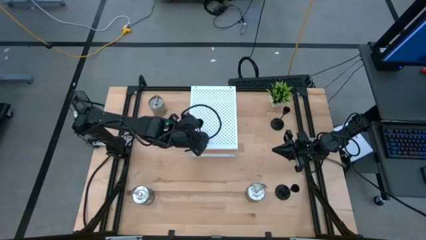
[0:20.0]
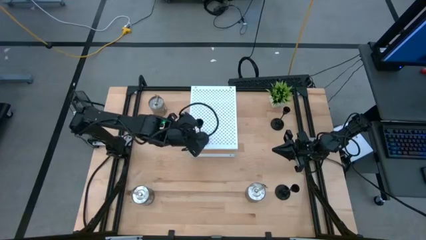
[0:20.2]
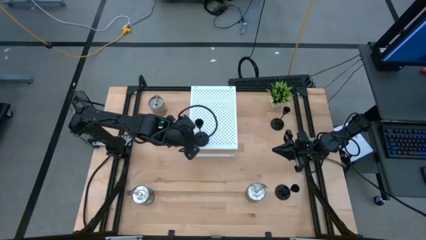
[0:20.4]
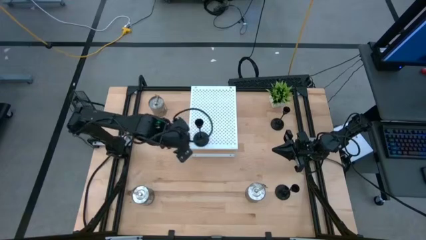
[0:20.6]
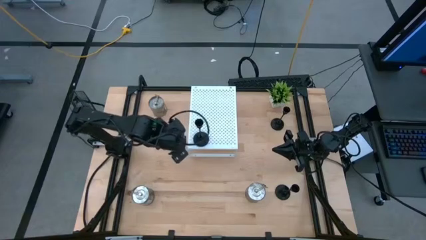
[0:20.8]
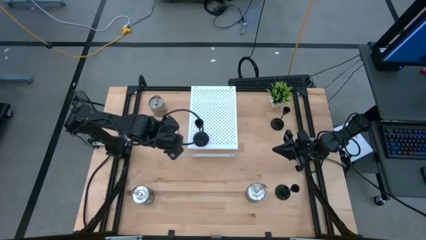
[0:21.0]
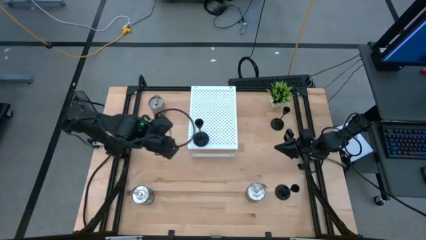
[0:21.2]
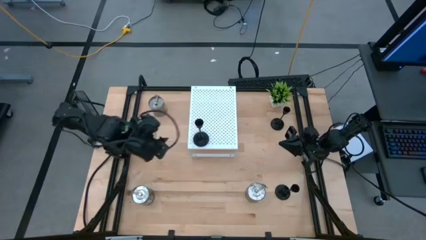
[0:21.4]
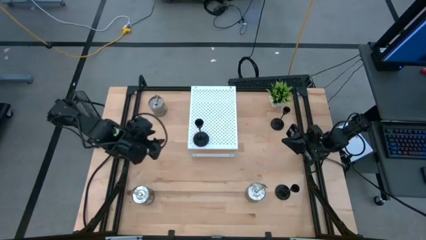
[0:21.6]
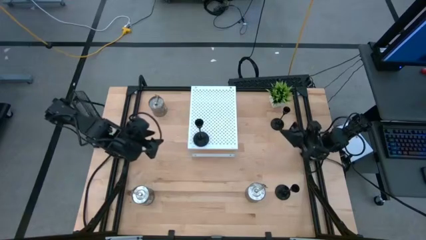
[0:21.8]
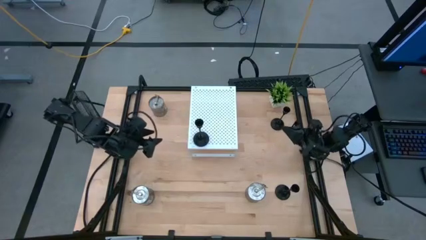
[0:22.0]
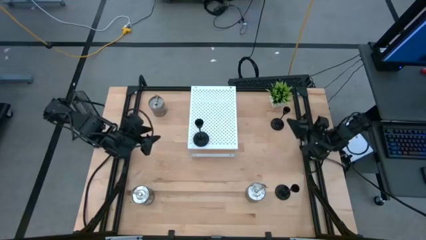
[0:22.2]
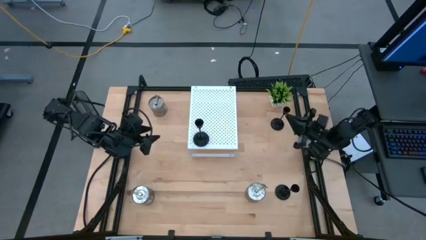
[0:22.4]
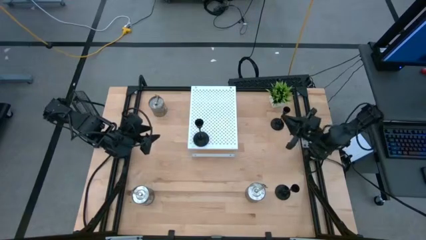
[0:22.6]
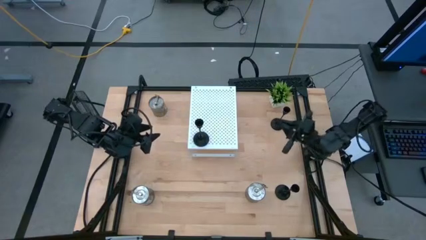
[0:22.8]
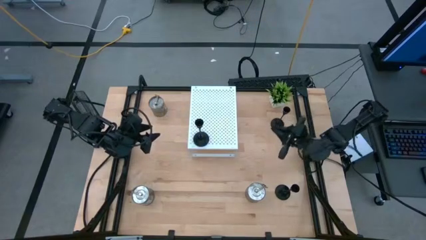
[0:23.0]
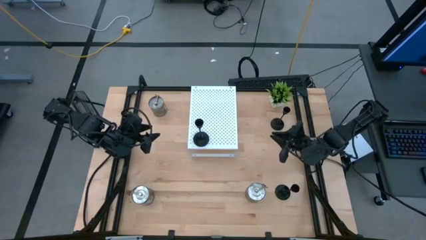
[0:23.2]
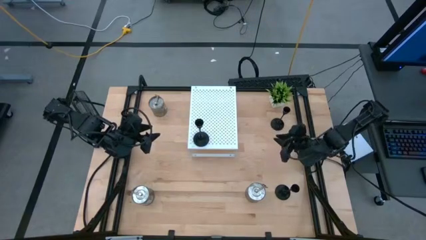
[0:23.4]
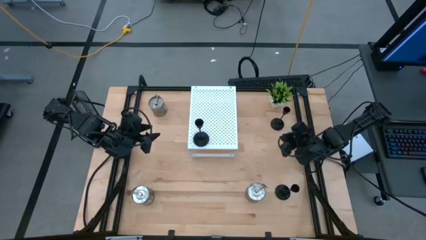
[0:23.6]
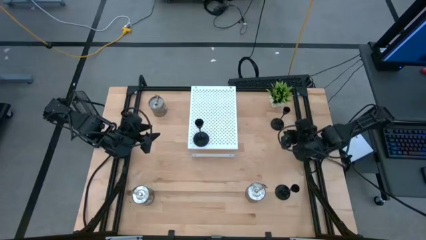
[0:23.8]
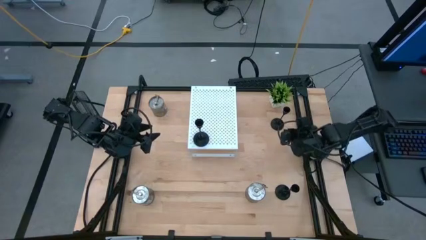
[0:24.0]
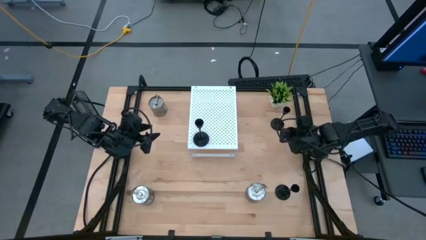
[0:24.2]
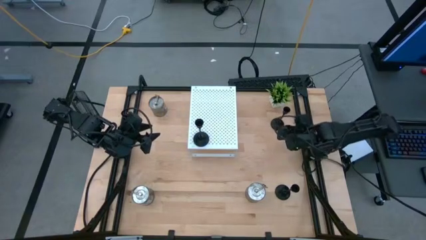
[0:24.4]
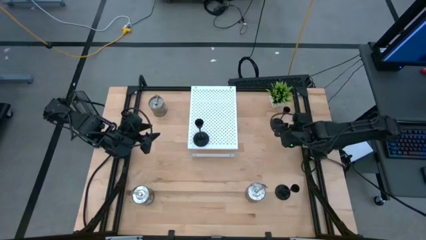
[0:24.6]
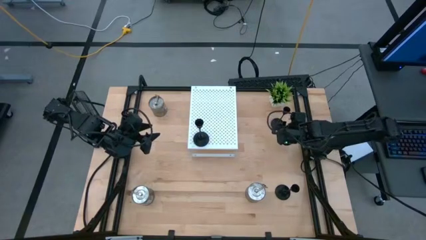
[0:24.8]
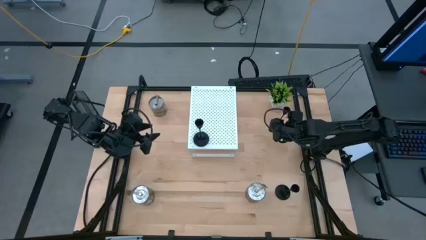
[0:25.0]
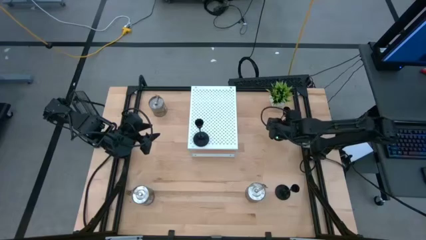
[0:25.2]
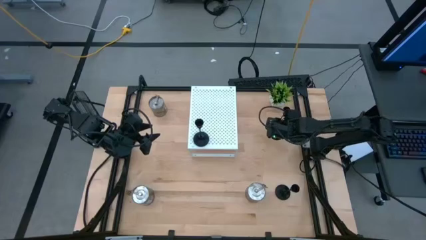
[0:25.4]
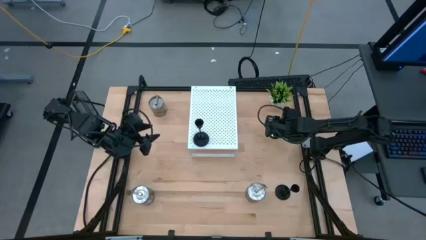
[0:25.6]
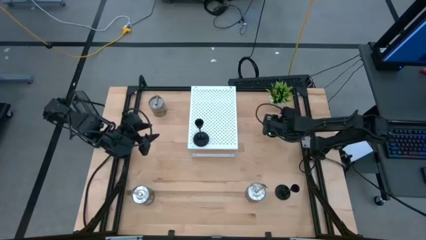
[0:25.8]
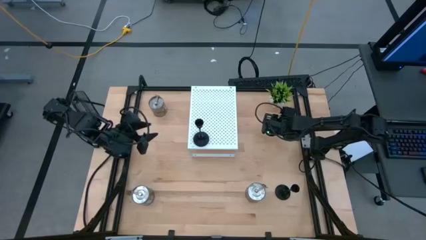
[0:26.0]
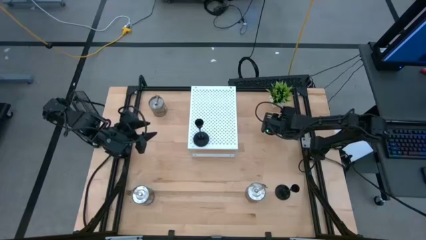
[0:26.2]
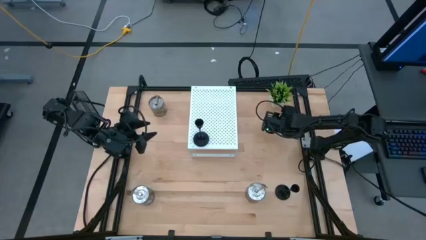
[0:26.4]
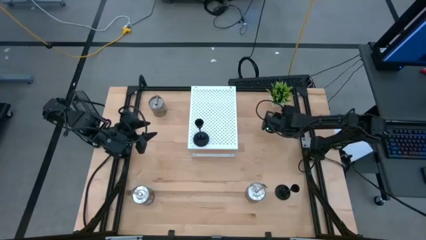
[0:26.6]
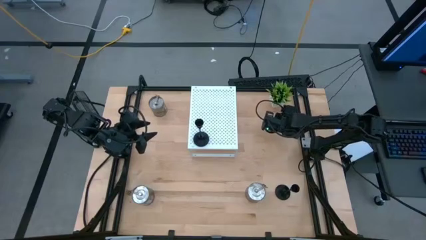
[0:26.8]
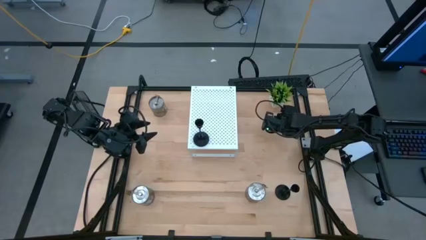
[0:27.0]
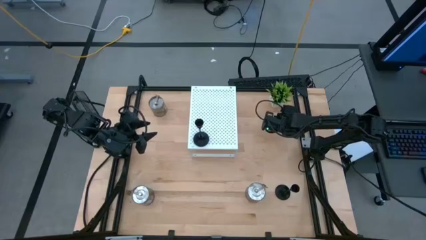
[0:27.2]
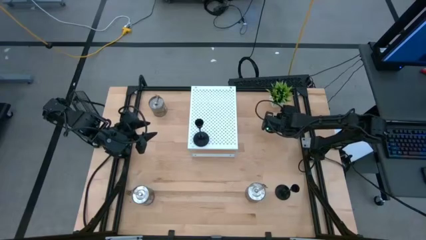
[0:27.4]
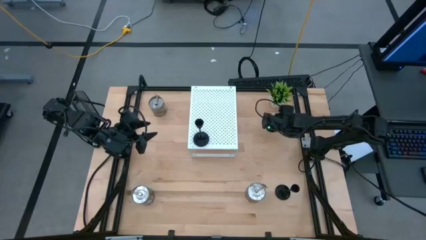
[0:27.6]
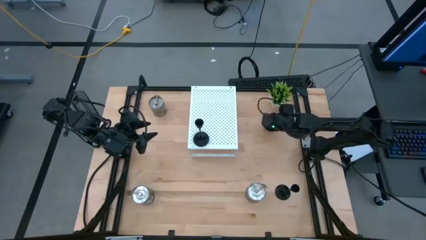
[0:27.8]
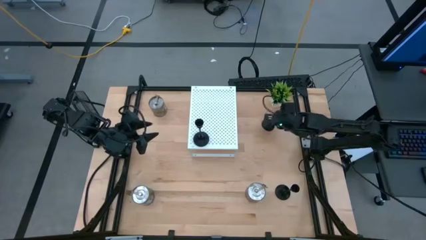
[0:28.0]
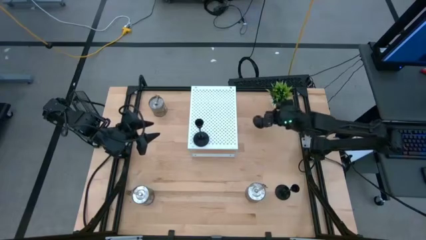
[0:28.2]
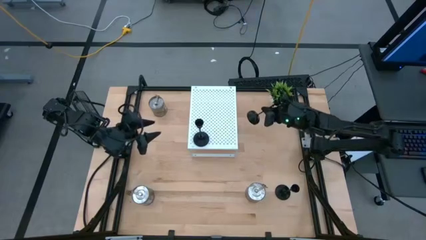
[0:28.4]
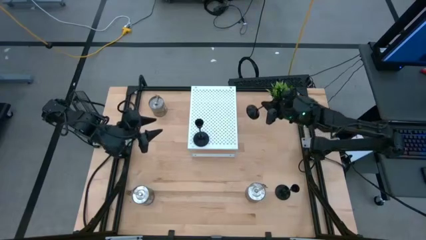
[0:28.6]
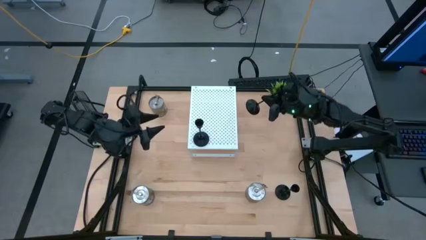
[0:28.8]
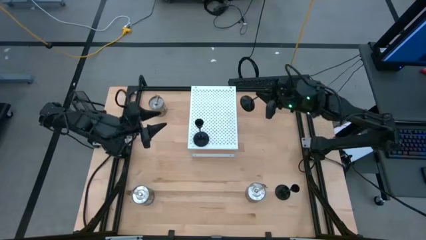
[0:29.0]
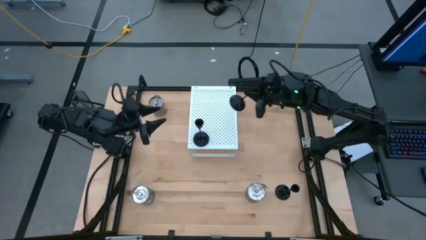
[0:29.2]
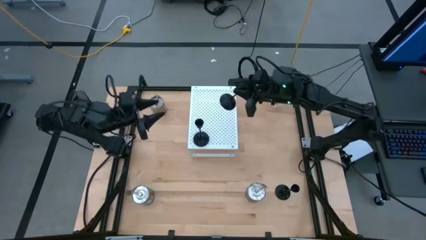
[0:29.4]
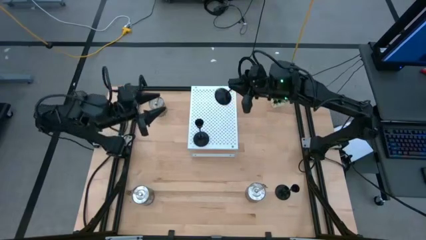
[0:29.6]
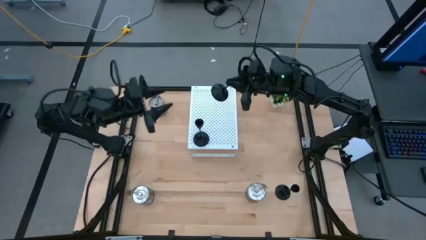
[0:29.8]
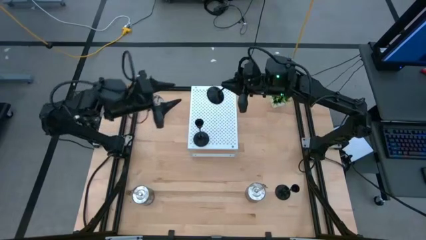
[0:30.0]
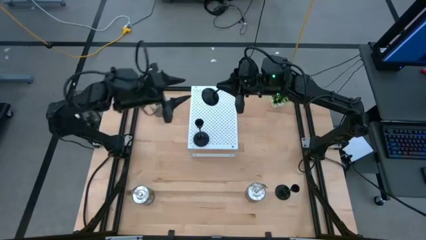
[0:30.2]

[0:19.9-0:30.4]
Task: Pick & Place candle stick holders
Put the top black candle holder on the shelf aligned with the other black candle holder
